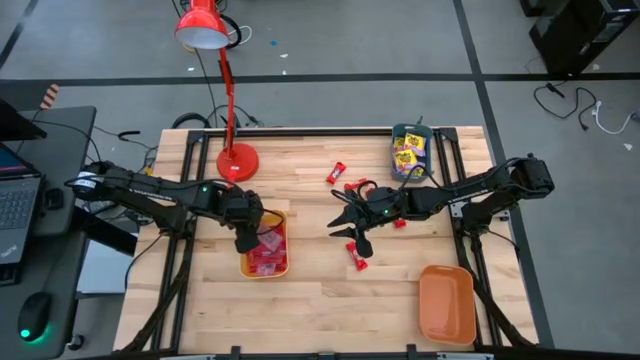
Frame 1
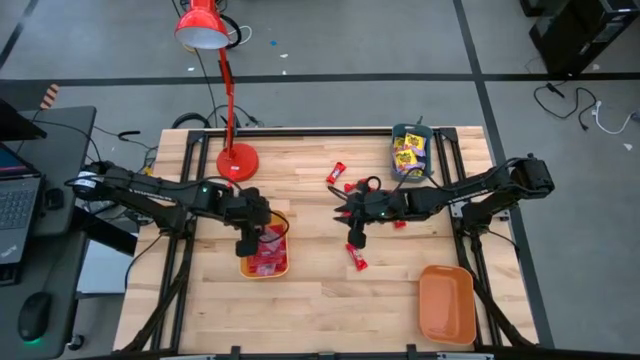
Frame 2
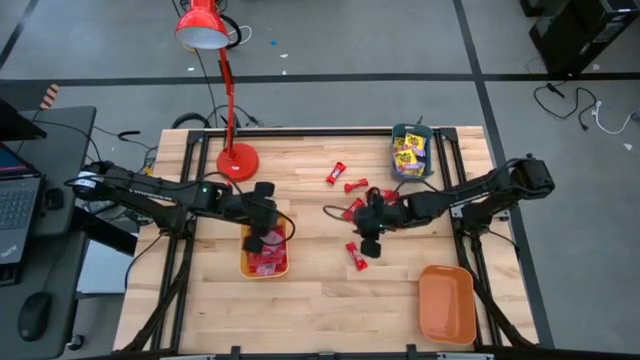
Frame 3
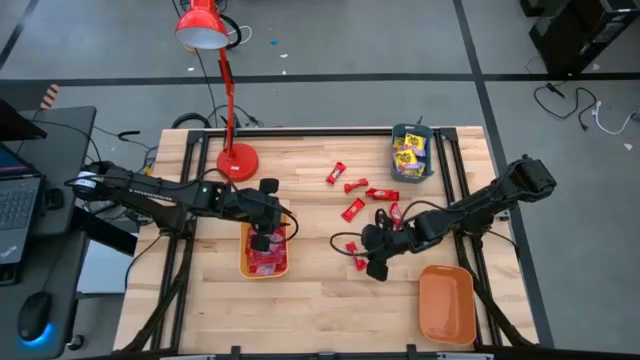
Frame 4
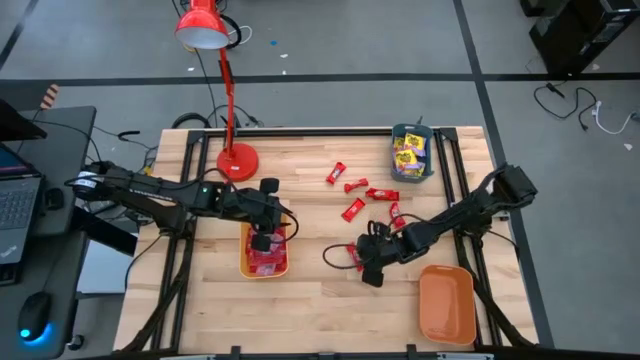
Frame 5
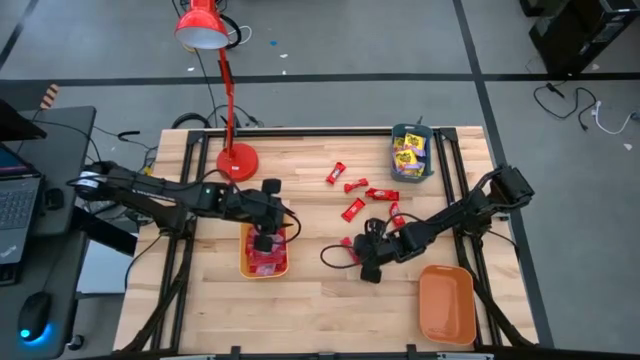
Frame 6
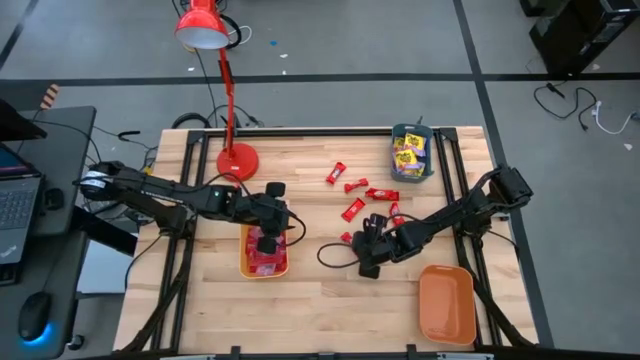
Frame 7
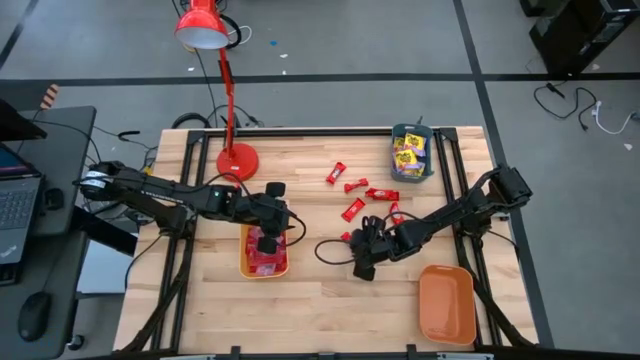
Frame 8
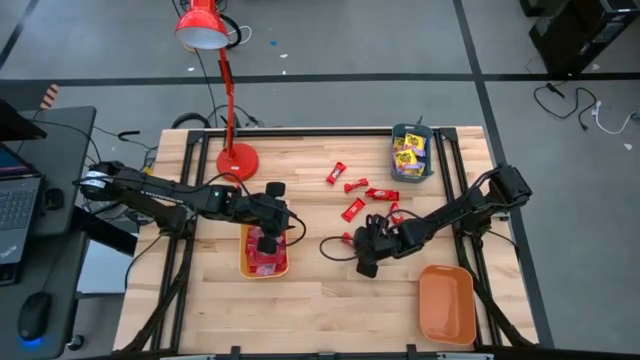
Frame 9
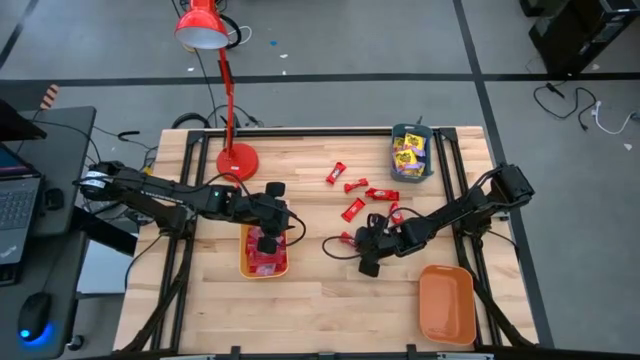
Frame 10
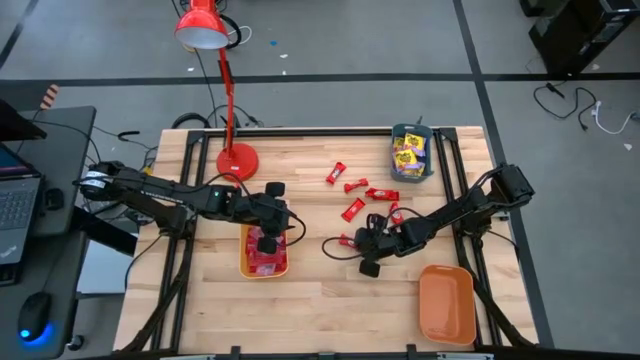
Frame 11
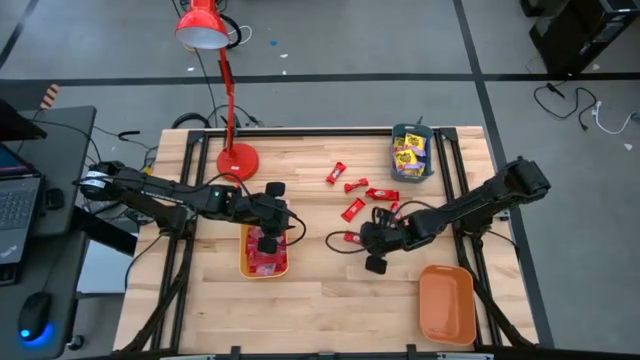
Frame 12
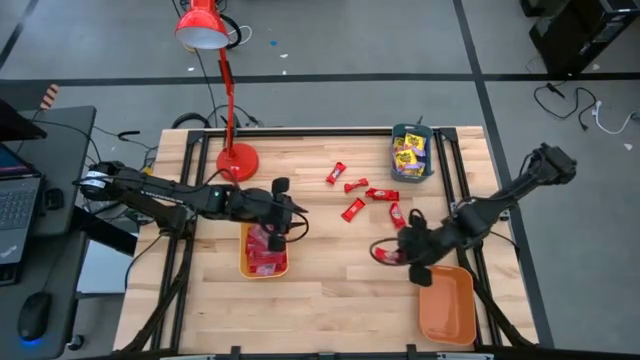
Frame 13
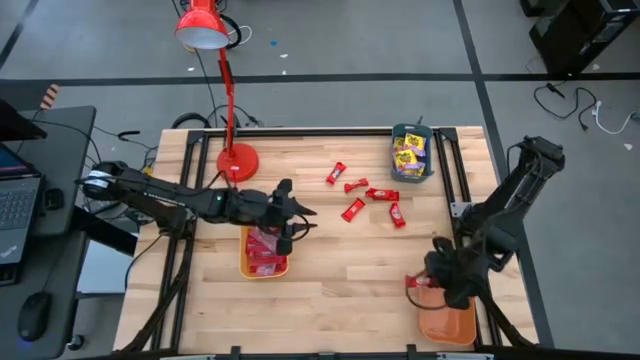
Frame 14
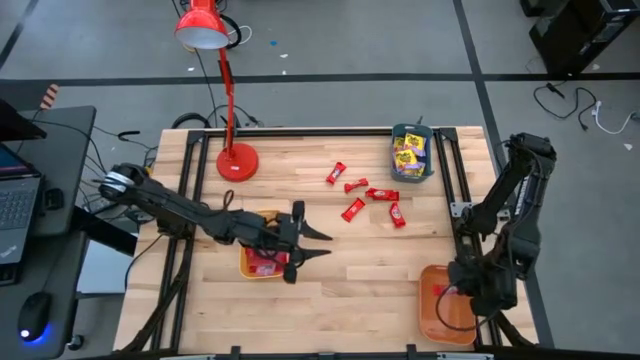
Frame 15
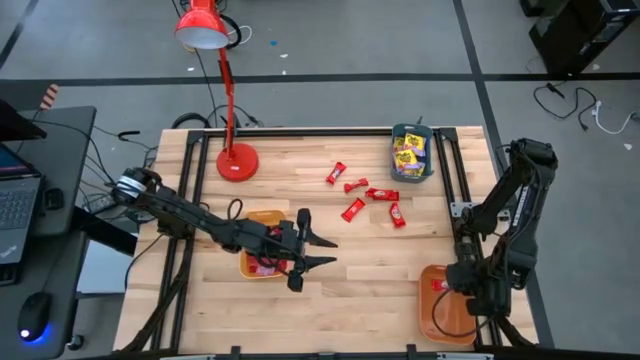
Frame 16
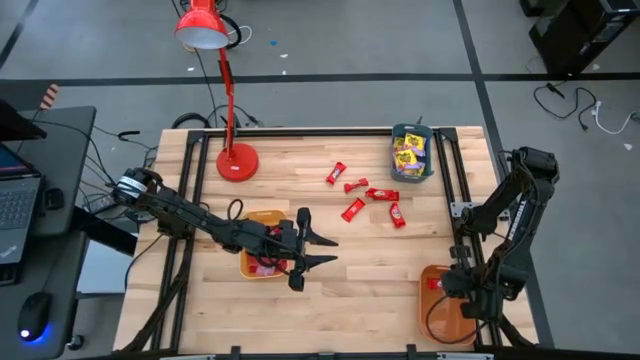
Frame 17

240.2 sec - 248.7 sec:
Task: Sort candy
Put the red chocolate into the orange bin

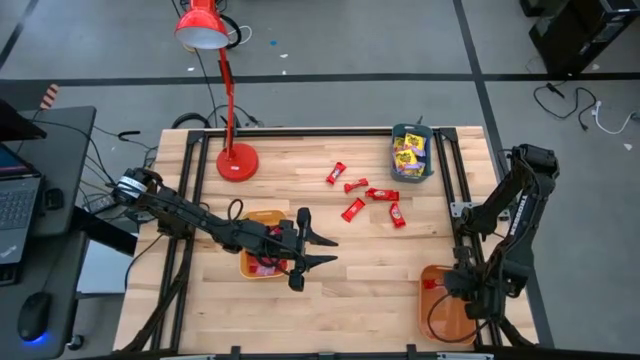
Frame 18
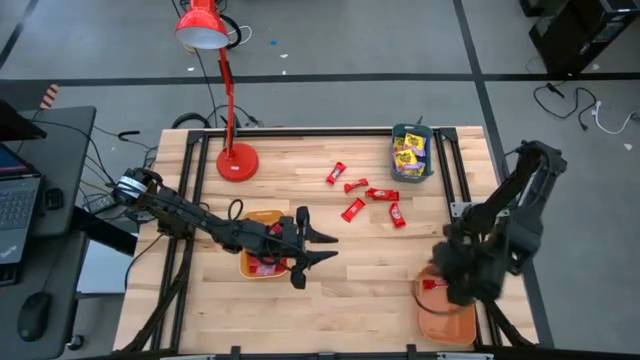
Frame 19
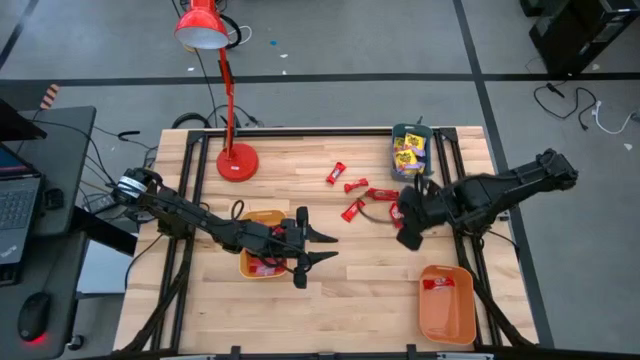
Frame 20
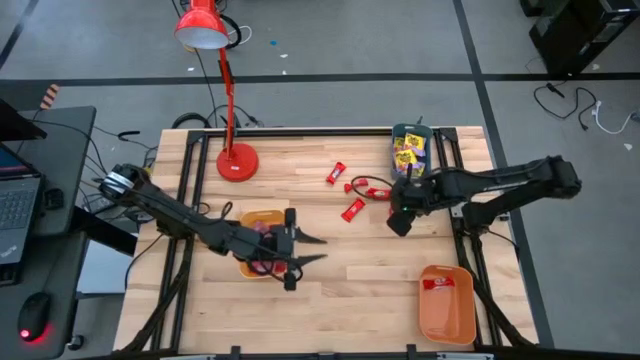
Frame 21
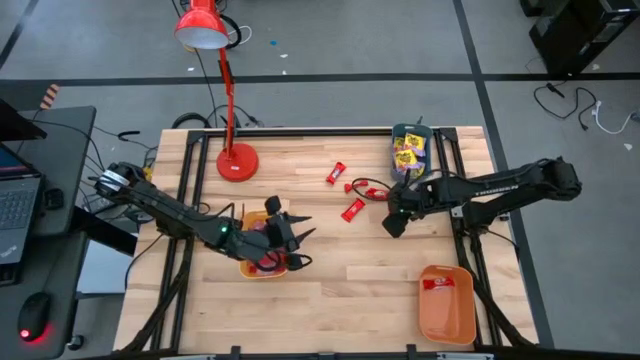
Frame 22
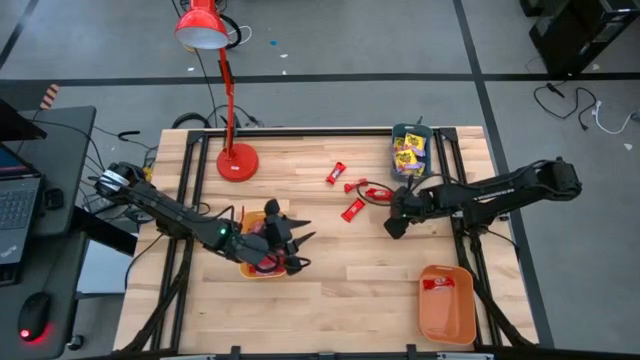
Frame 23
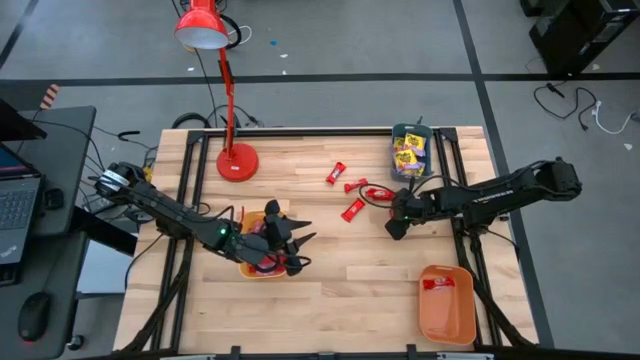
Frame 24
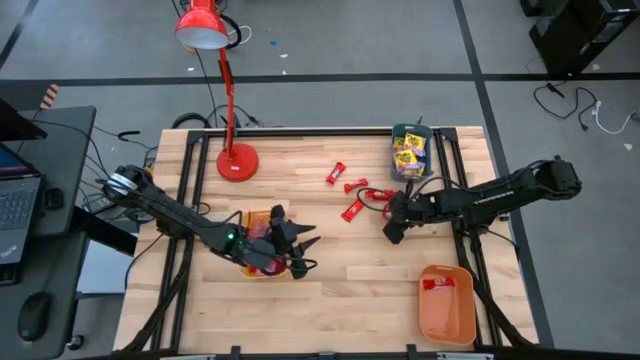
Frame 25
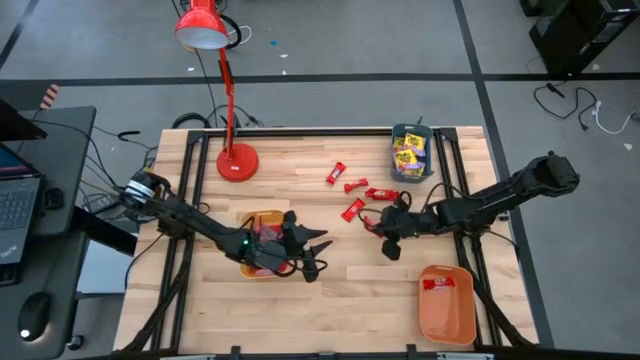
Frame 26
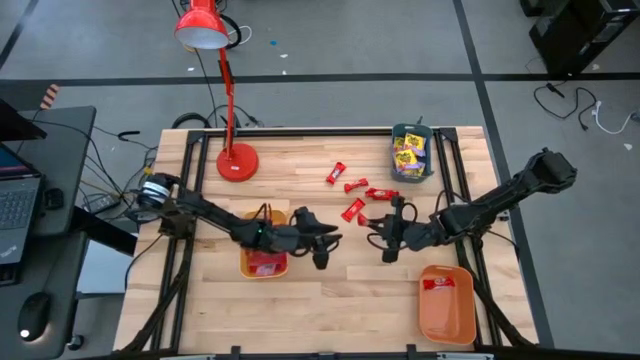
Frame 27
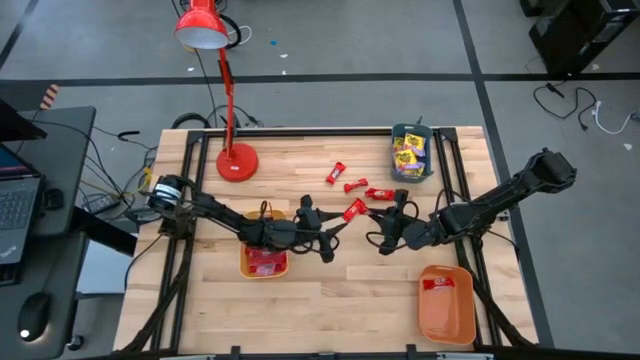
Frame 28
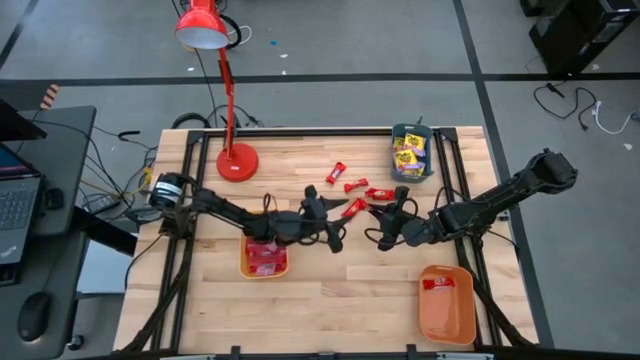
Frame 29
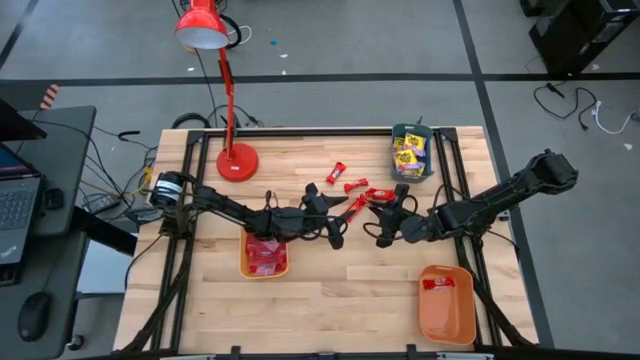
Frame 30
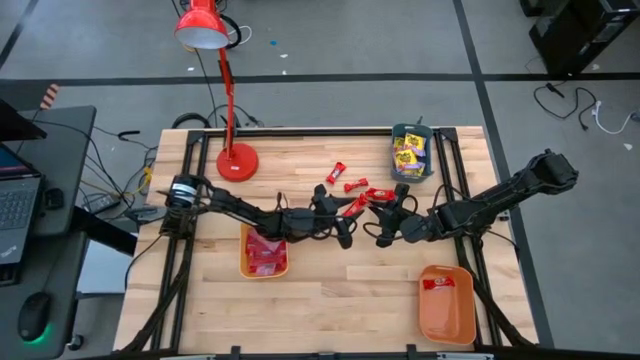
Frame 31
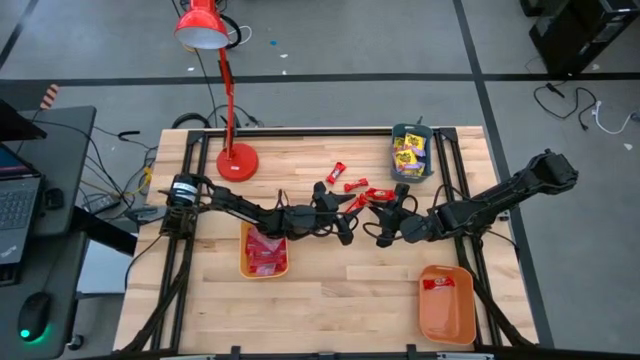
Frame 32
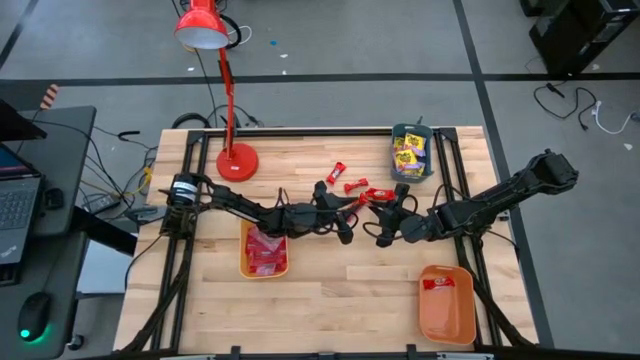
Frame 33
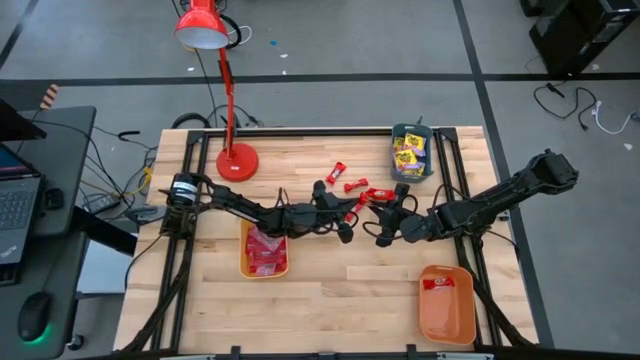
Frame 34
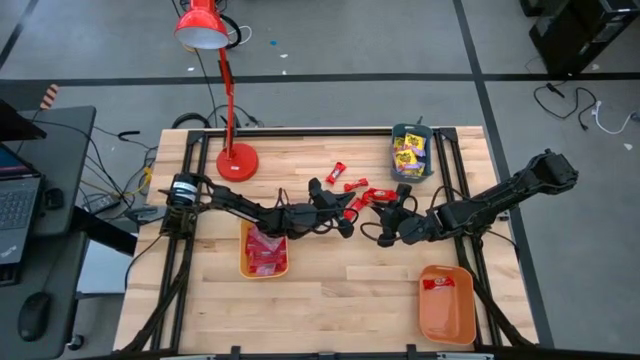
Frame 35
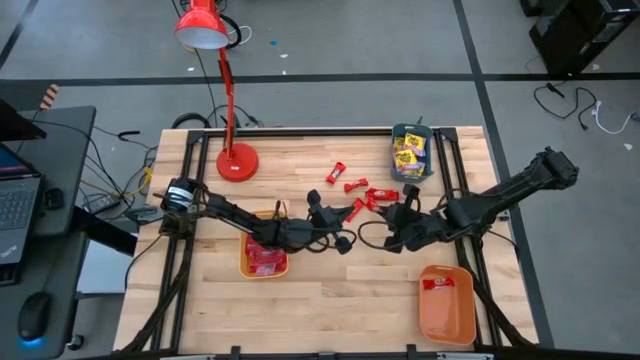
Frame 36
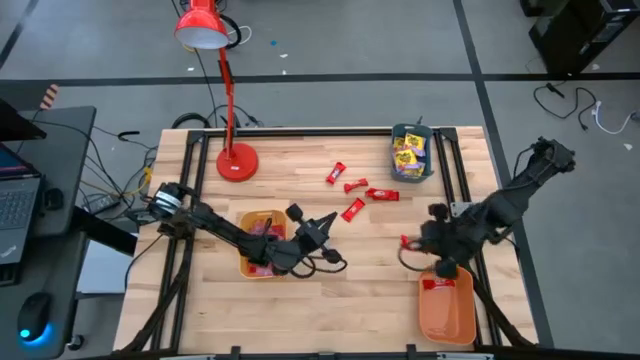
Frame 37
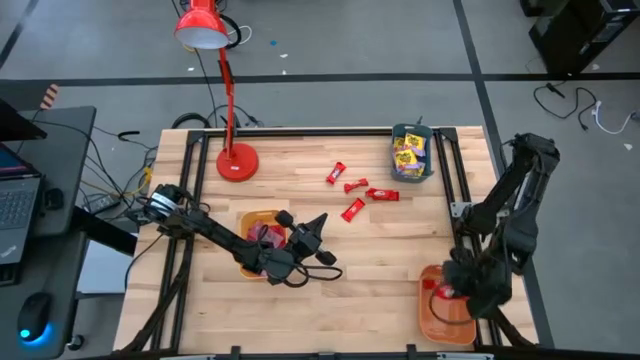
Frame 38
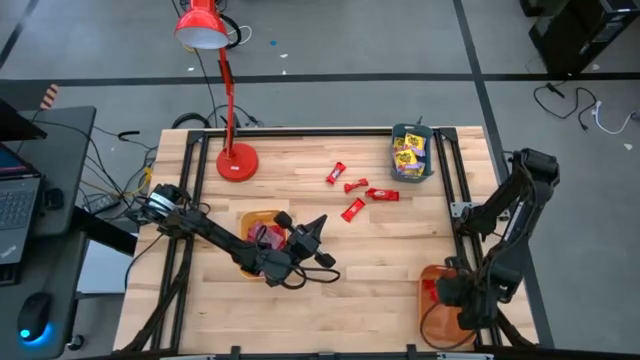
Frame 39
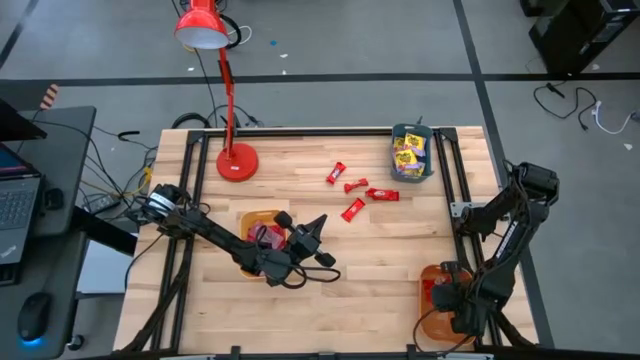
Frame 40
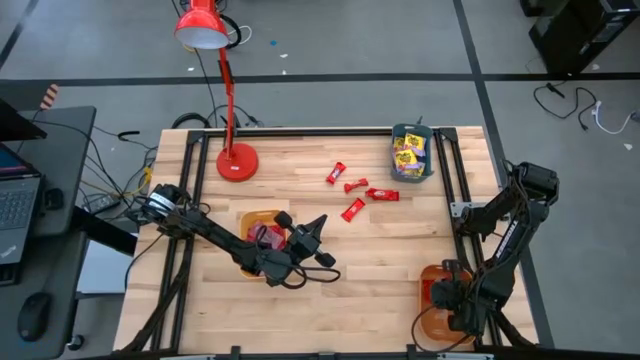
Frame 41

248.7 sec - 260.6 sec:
Put the red chocolate into the orange bin
